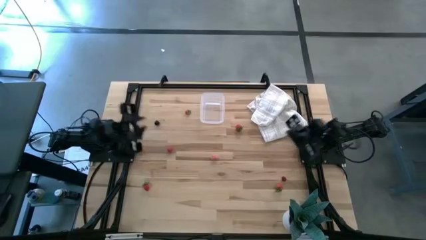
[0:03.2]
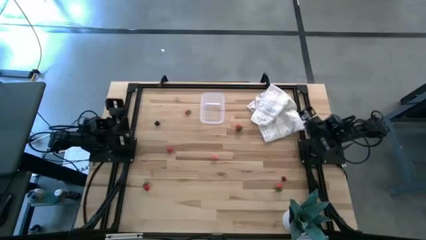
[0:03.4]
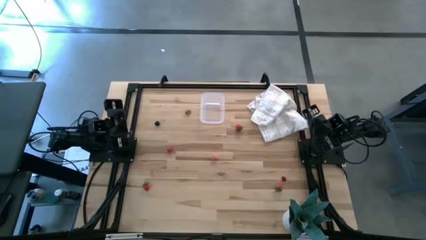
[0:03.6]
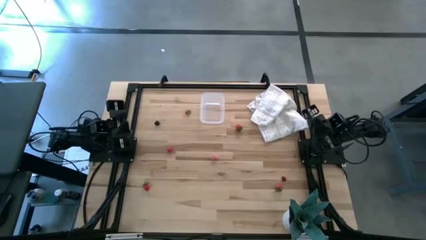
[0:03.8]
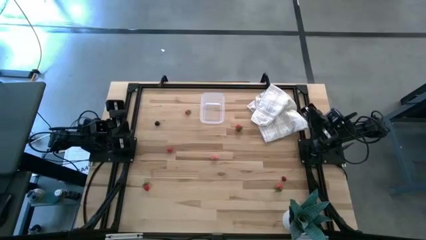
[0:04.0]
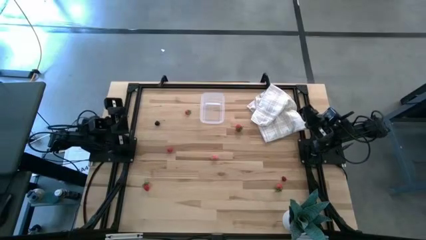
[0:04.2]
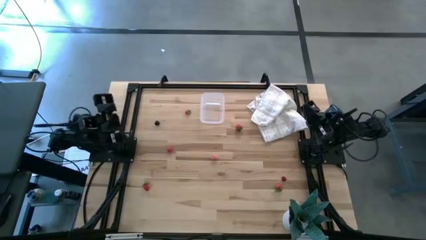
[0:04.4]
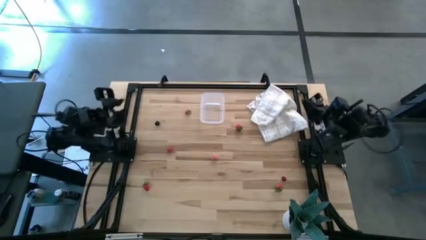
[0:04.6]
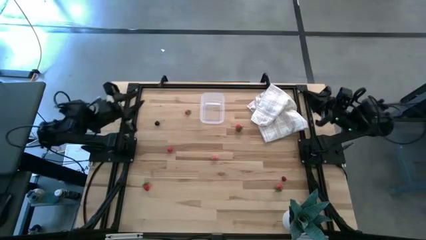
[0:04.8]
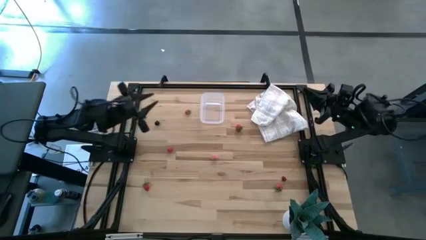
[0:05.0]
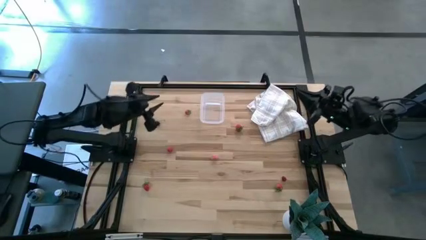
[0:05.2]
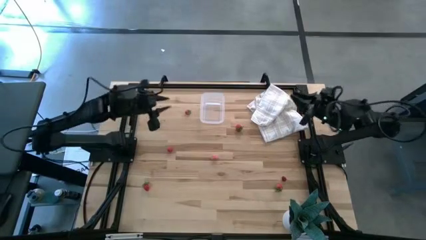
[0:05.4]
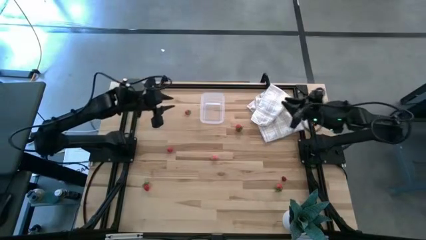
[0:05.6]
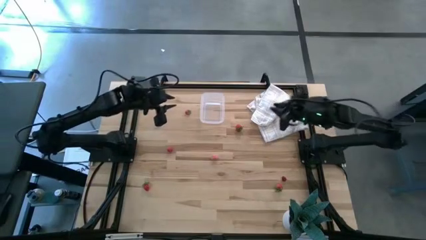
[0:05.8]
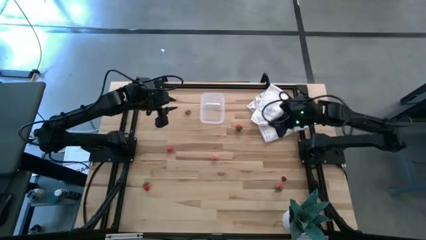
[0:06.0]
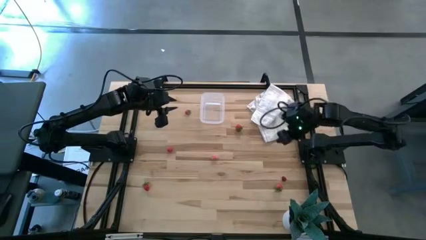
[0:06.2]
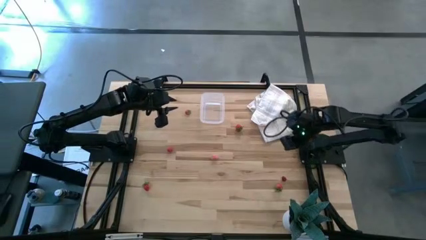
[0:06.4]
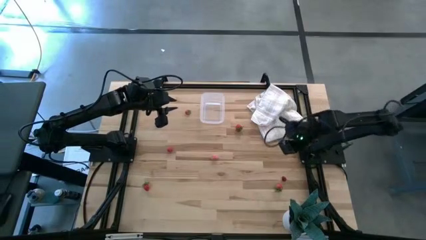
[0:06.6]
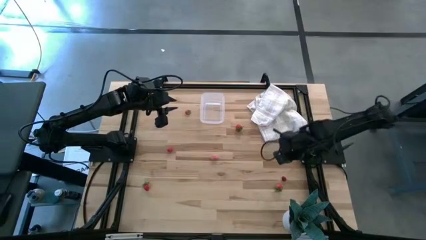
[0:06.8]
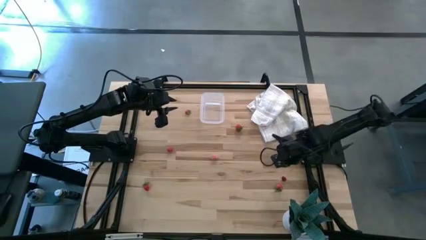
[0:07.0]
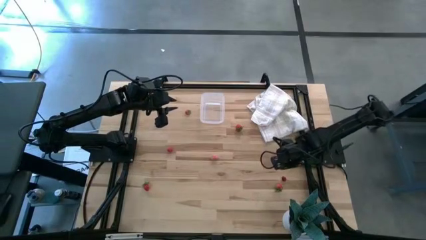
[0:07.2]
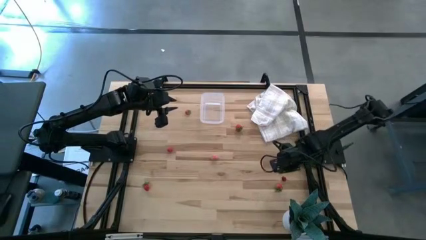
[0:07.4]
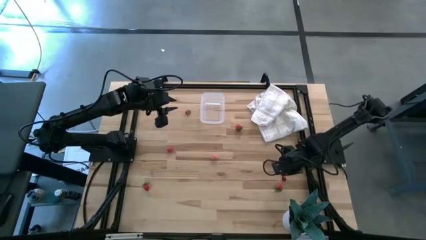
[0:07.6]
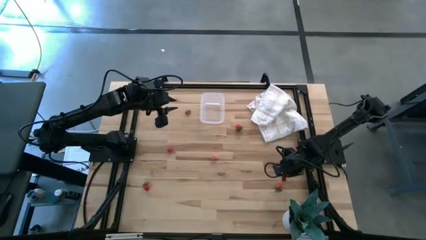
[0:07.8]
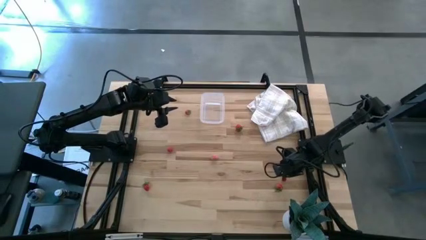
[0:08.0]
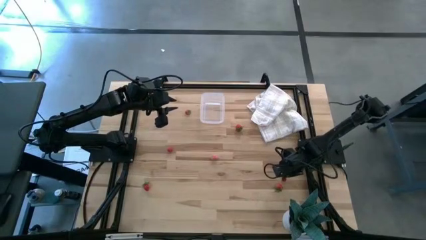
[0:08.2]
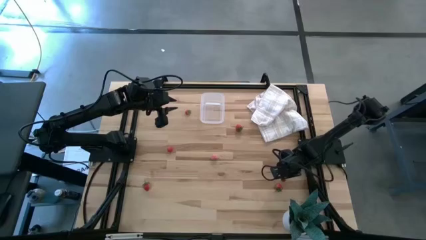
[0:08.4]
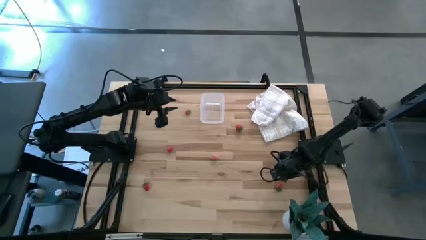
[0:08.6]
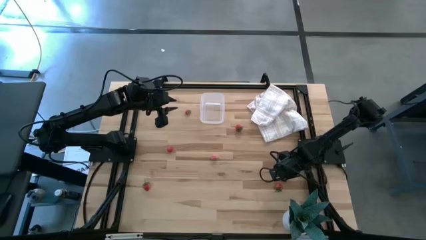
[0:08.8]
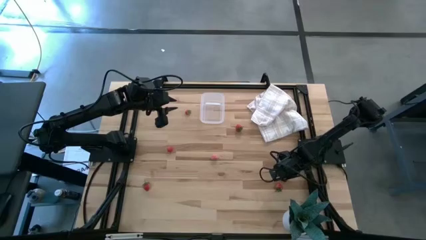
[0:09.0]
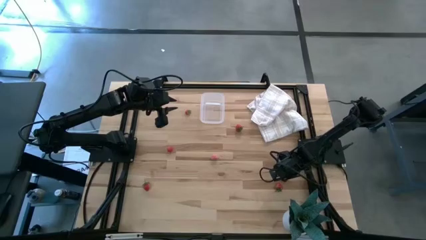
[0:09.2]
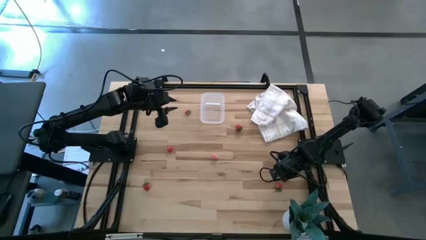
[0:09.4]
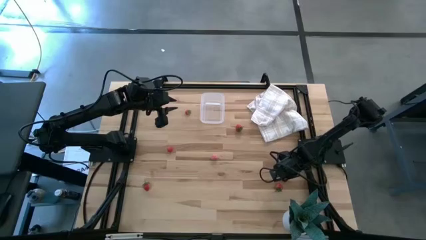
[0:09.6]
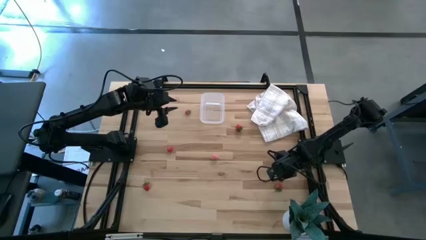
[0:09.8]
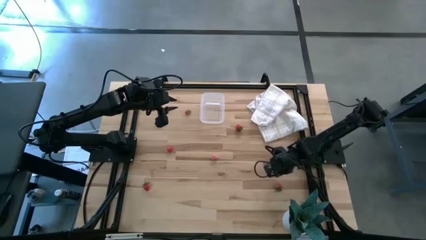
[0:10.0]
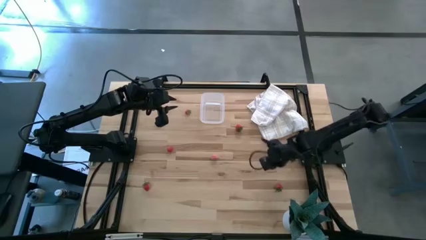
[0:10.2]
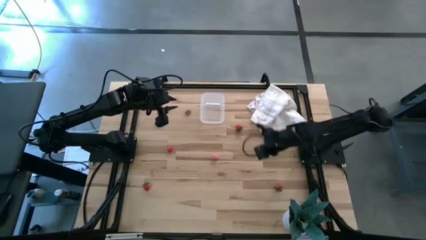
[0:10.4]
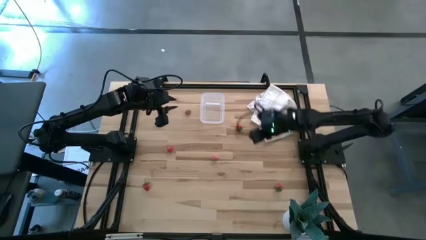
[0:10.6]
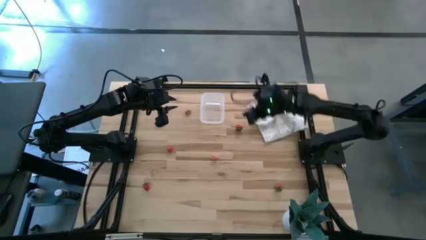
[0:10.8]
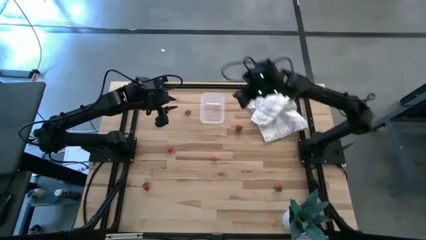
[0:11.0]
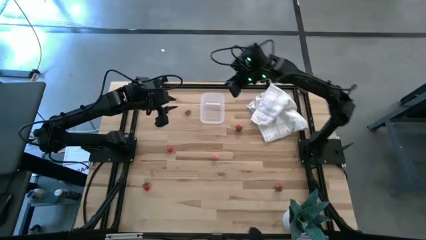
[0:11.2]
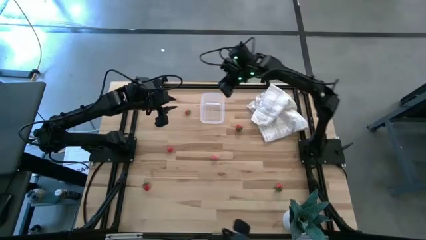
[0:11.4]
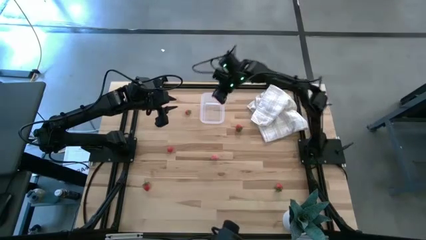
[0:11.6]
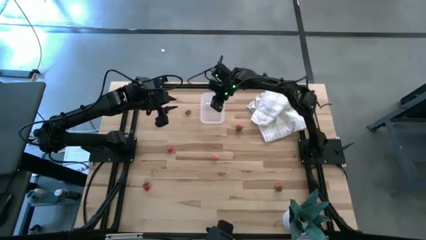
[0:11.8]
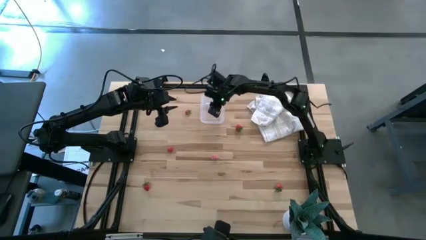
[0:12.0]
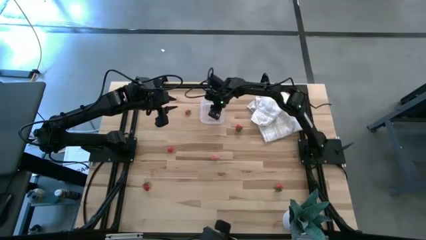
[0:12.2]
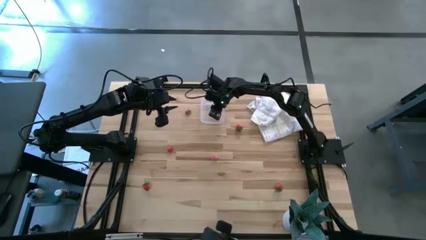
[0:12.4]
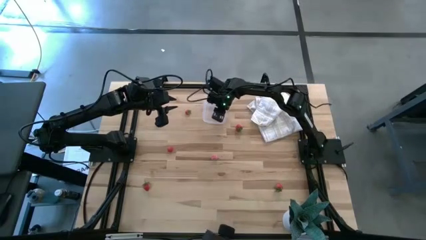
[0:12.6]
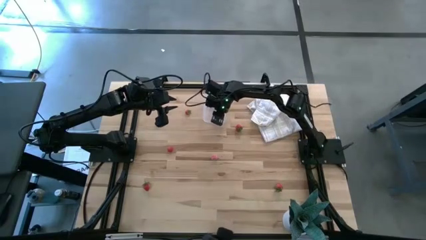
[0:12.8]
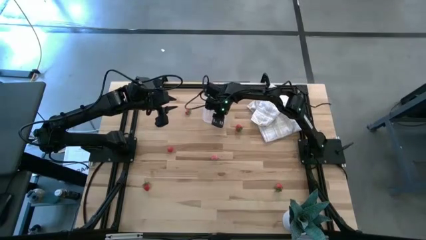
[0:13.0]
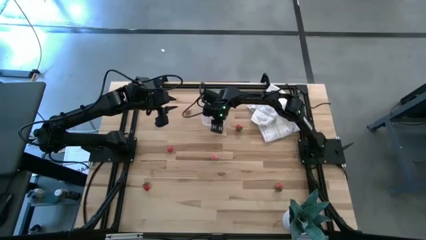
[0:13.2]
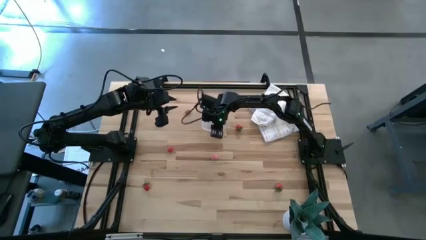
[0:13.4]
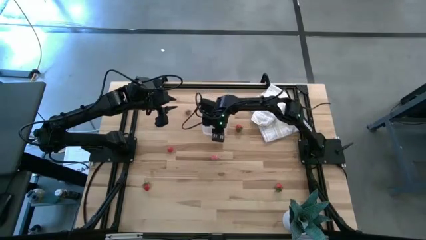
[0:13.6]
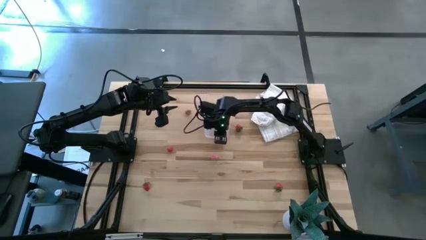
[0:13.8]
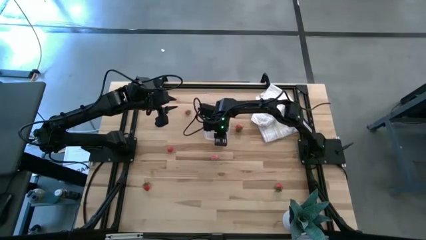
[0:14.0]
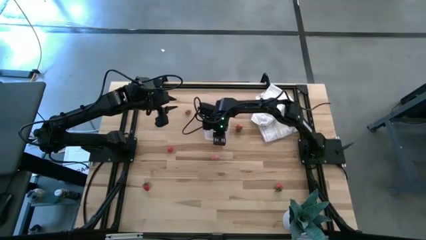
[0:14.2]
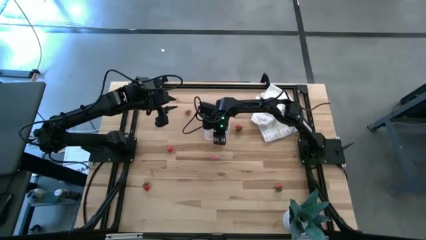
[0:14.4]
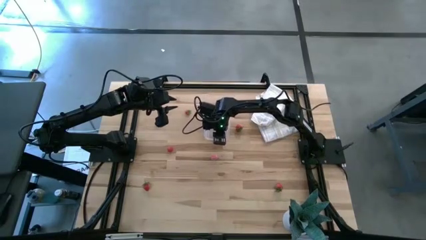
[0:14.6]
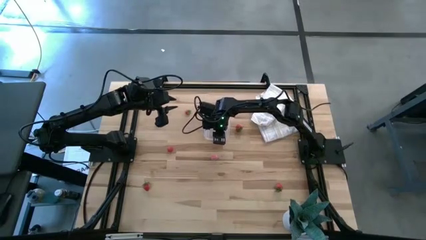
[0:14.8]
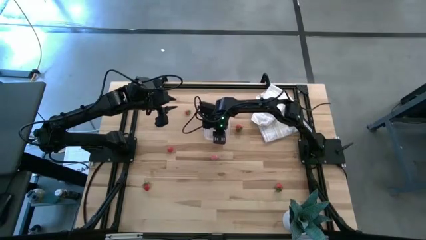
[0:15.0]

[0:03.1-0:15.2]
Task: Pick and placing Produce into tupperware
Put the cherry into the transparent container
